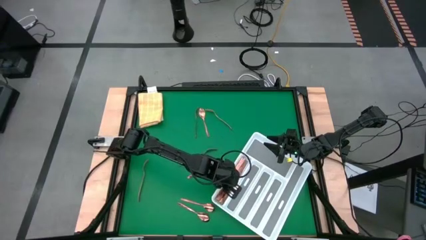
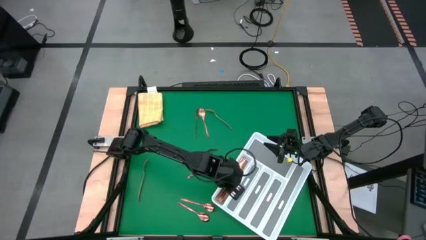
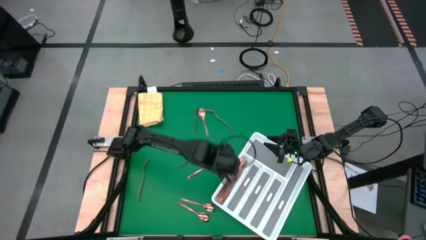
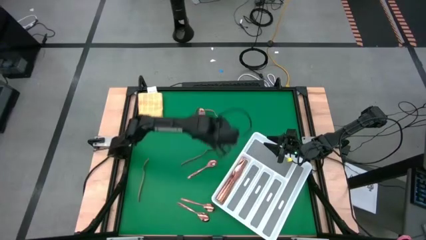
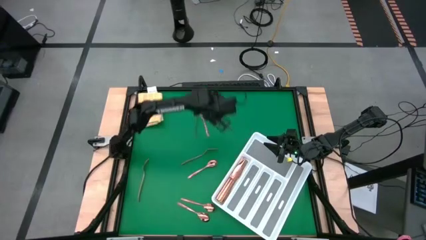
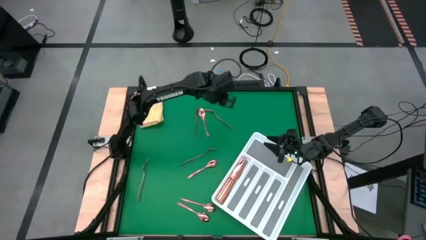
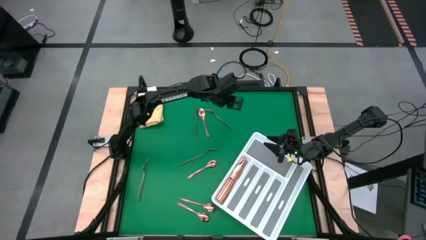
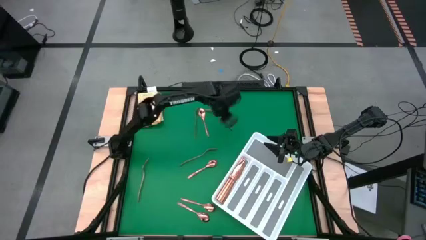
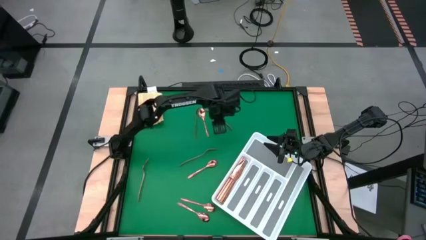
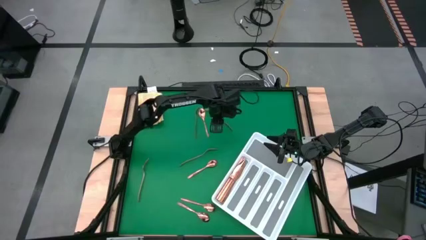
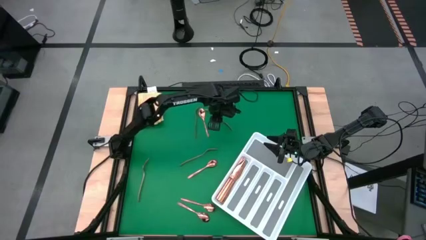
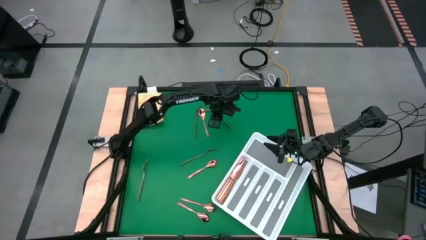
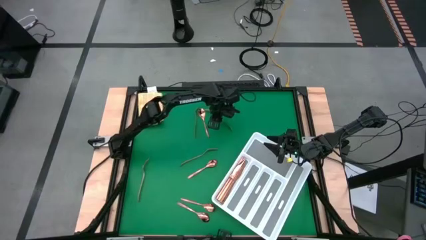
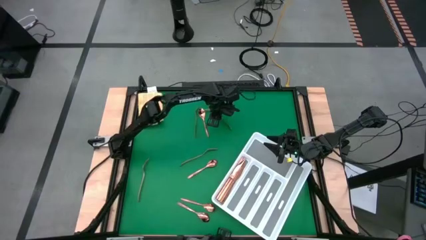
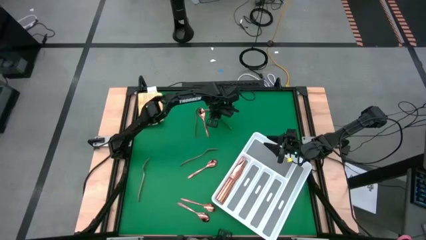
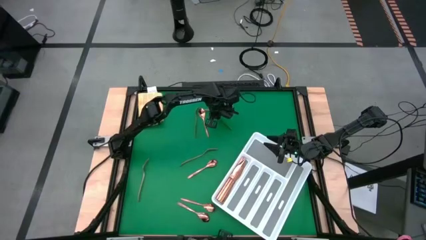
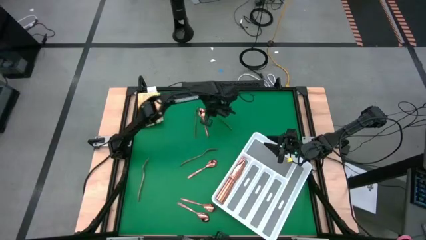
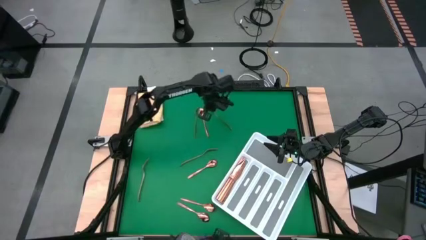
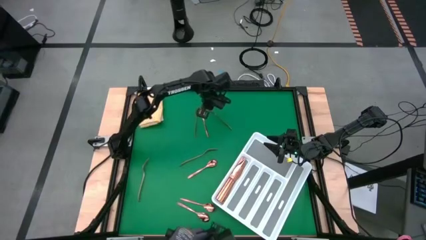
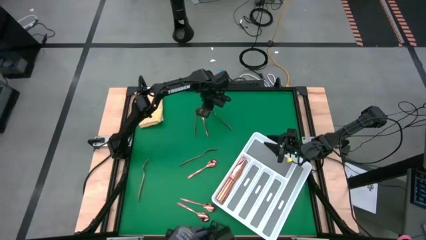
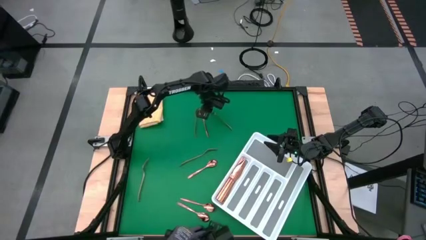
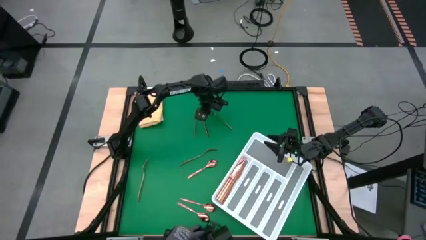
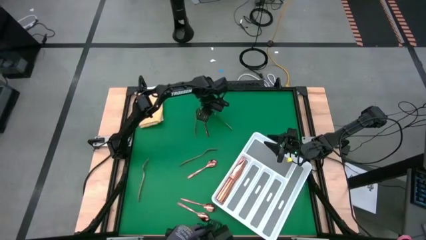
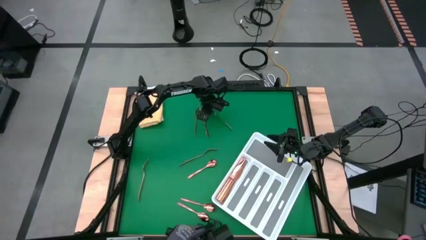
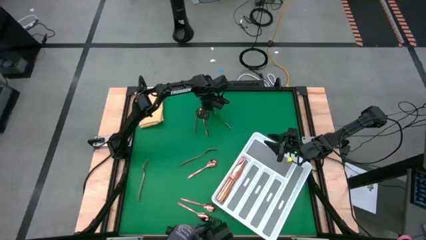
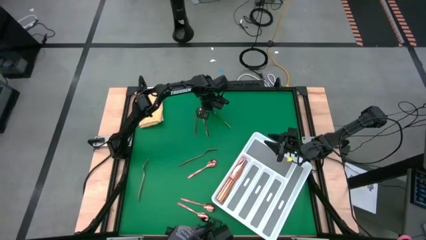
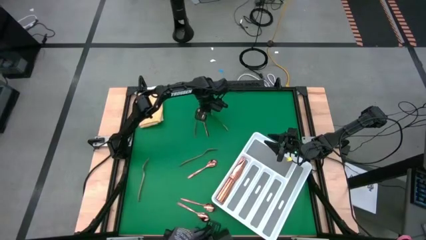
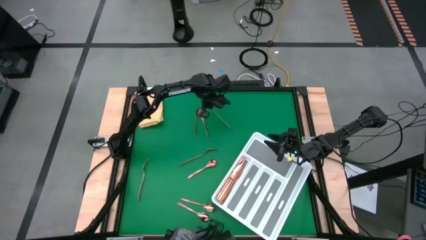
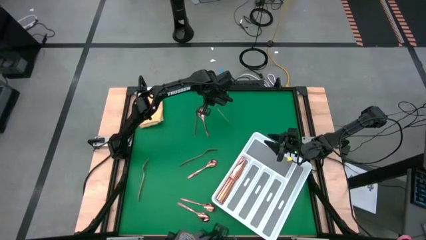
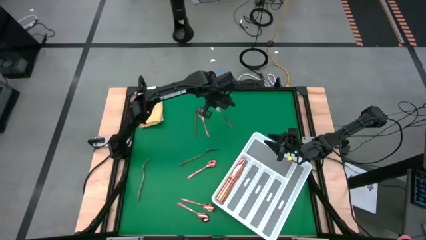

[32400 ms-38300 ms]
Task: Sort silverware
Put the gold fork into the white cutlery tray

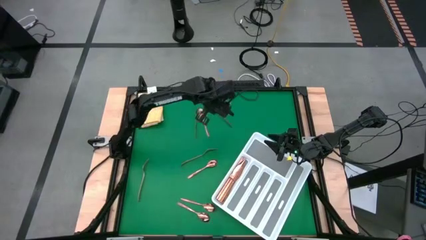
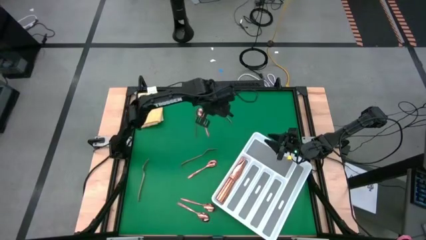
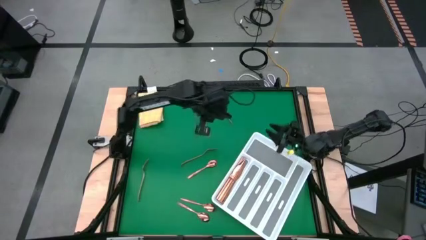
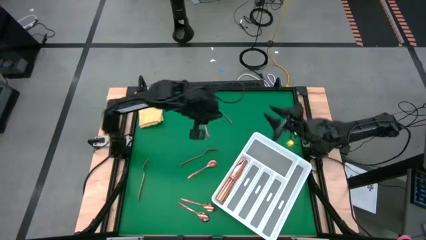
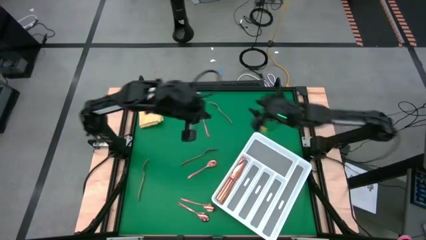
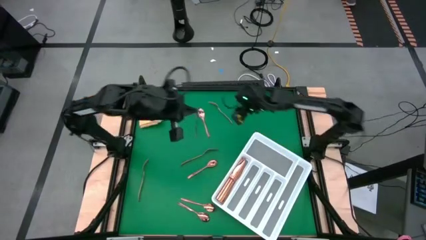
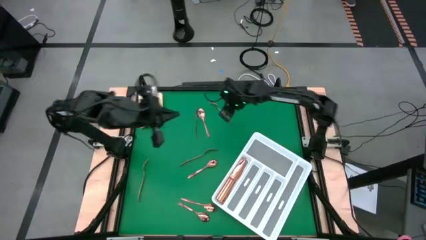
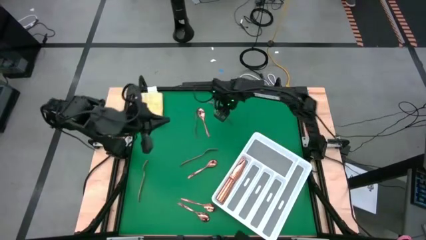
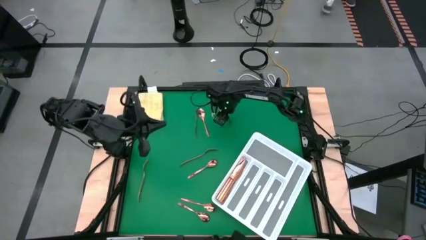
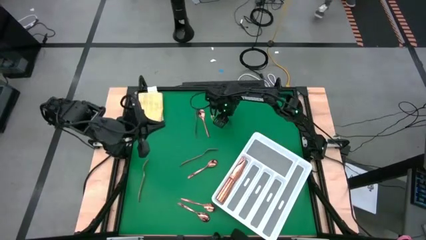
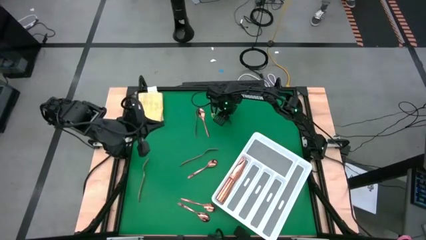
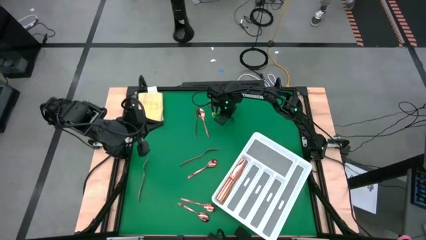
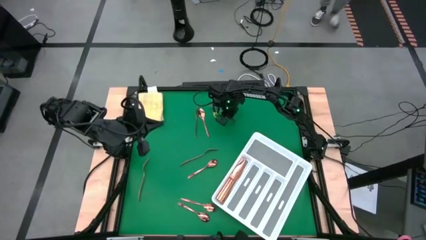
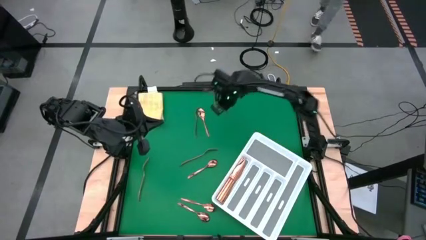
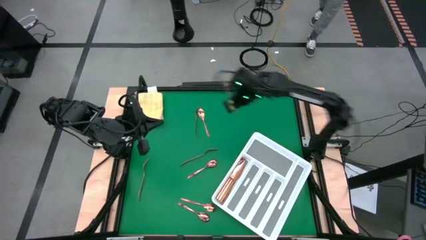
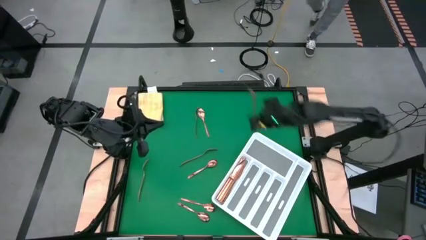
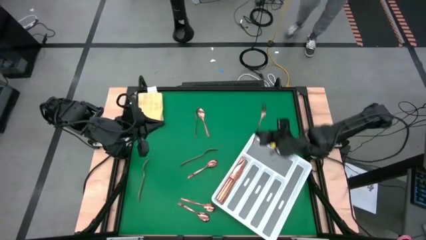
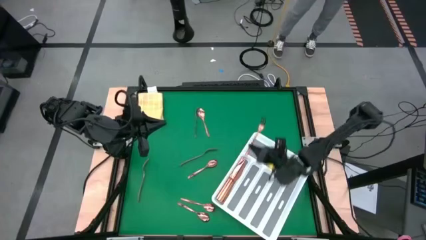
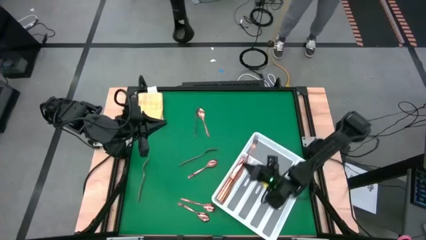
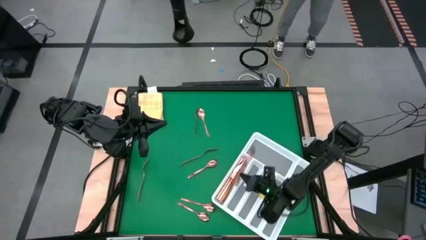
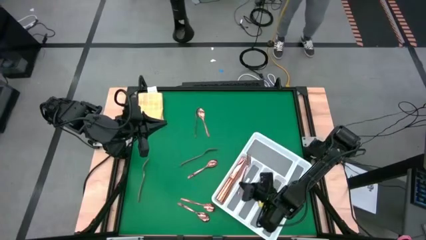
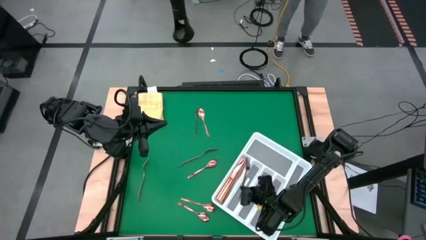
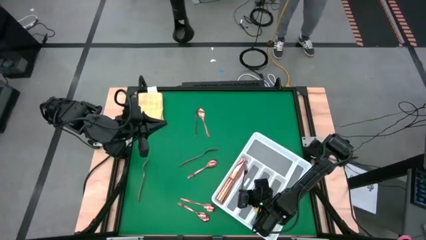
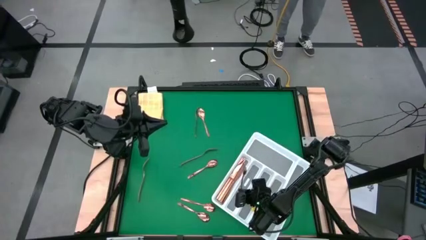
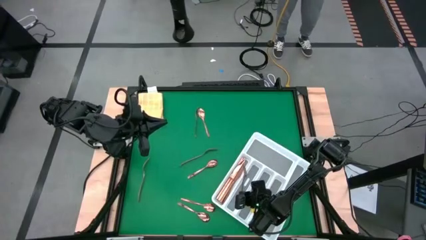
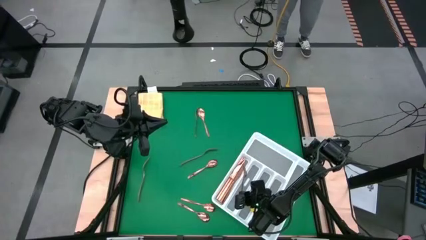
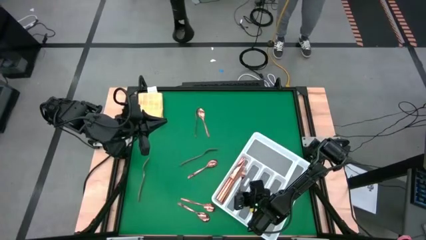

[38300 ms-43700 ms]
Put the gold fork into the white cutlery tray

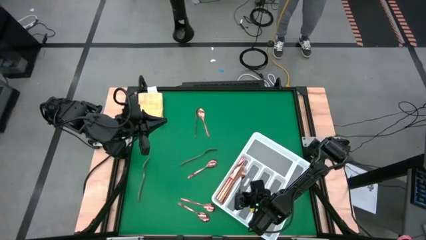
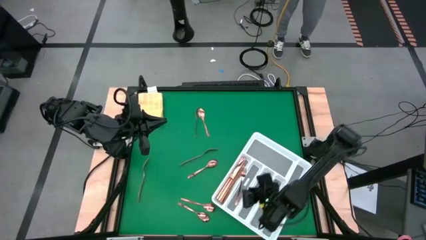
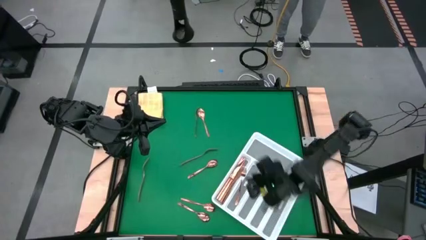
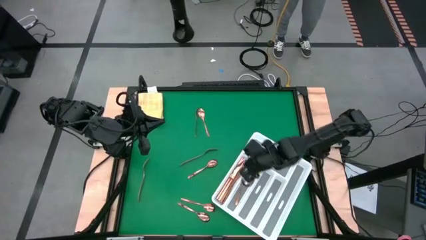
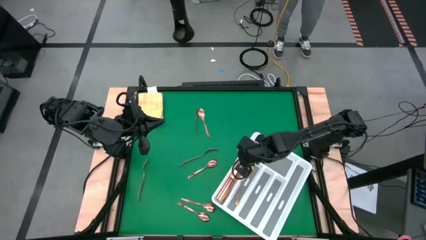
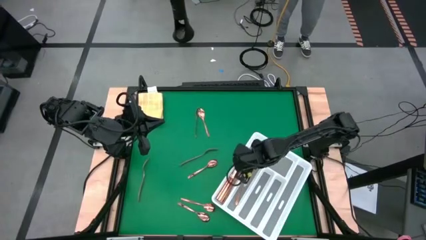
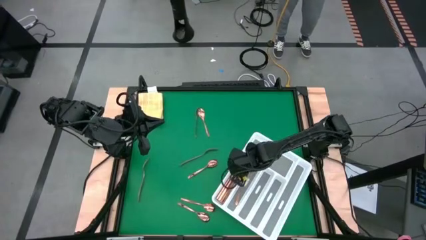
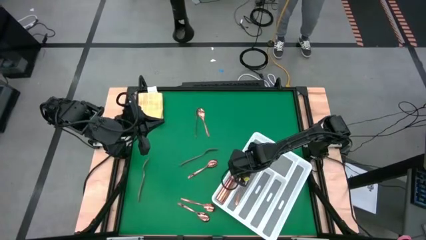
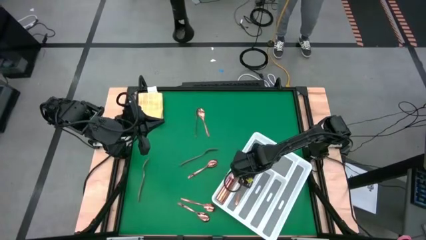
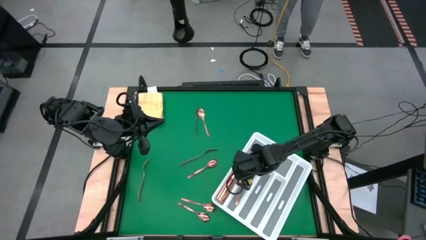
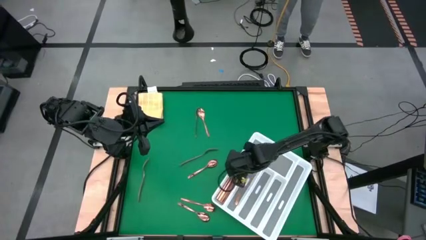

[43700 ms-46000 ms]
Put the gold fork into the white cutlery tray

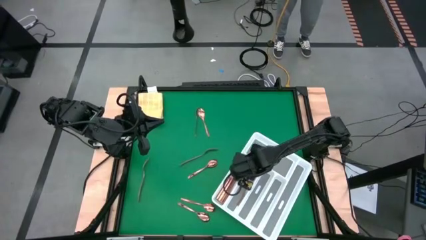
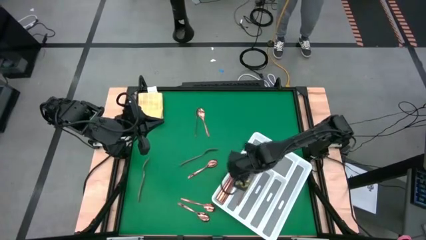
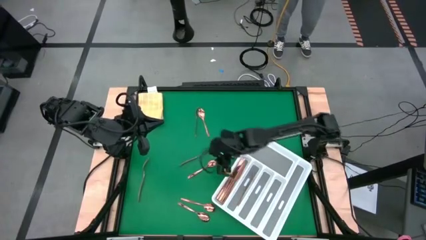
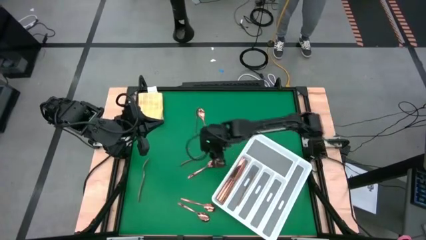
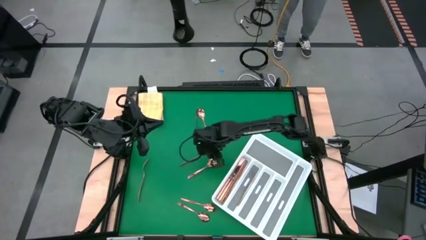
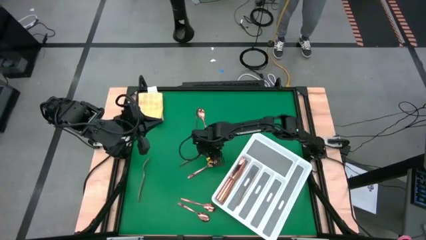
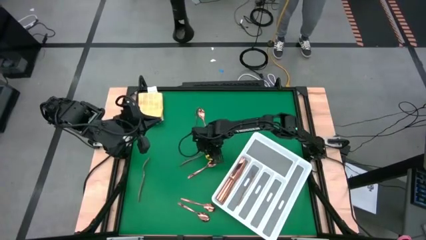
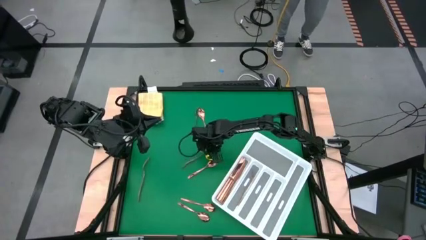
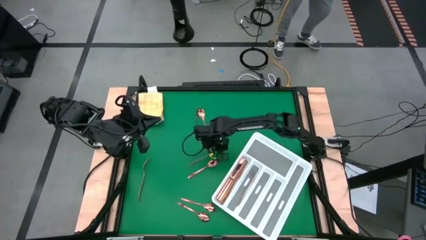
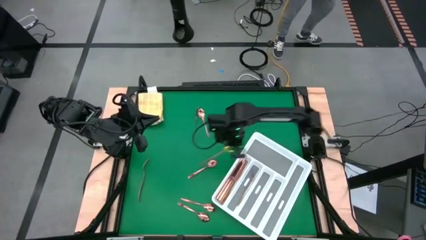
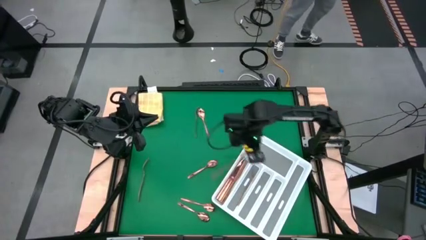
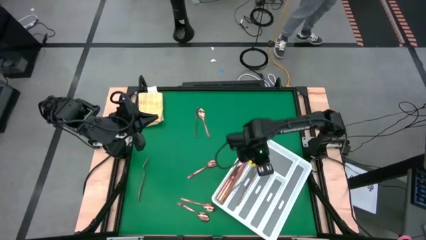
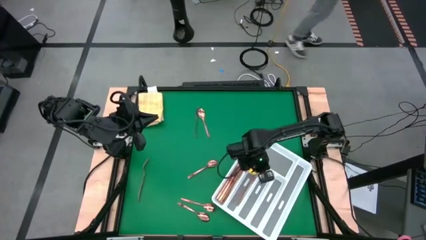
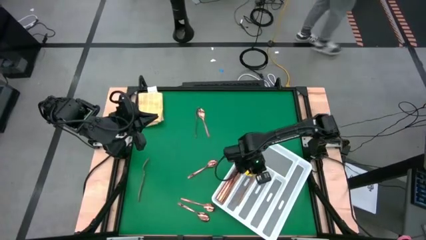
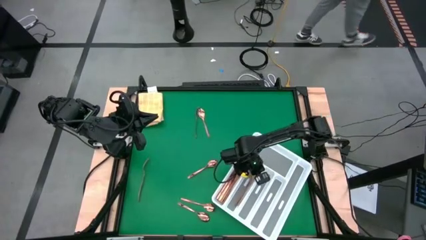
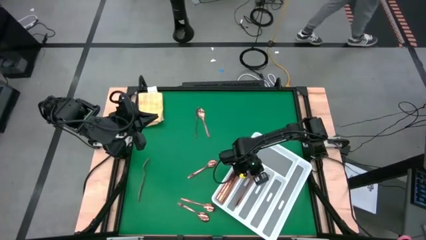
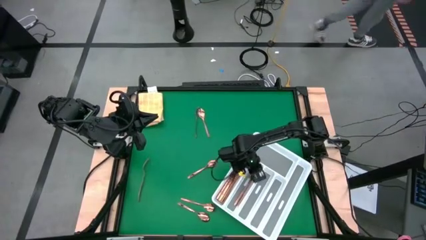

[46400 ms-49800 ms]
Put the gold fork into the white cutlery tray

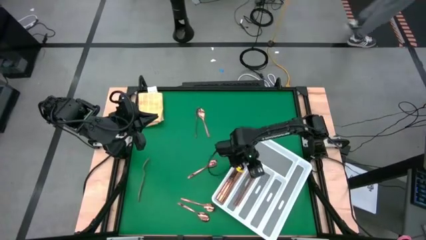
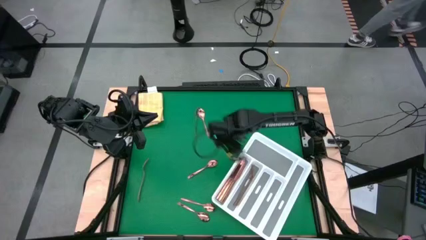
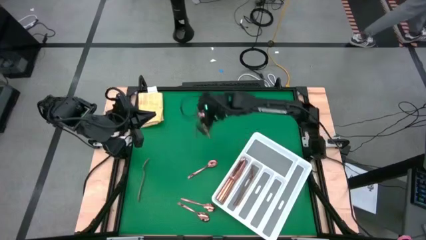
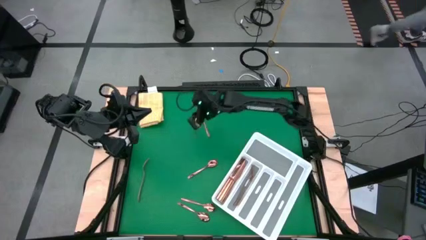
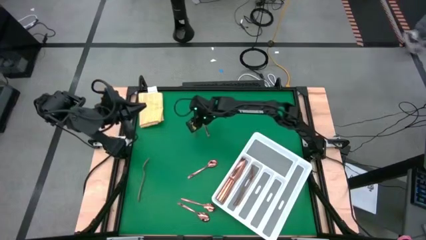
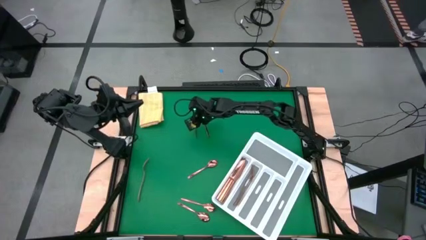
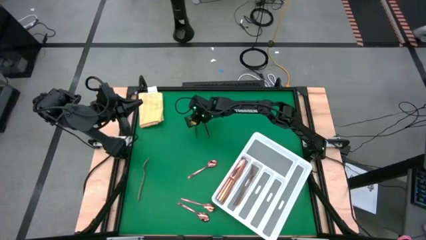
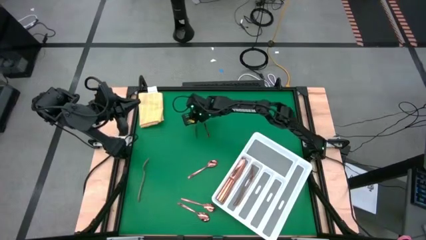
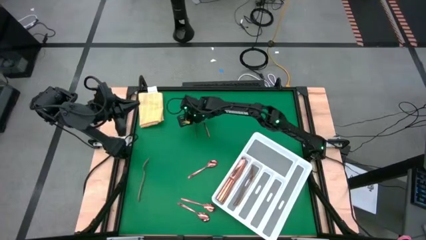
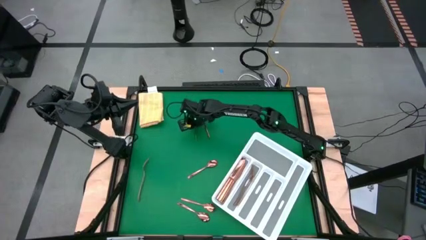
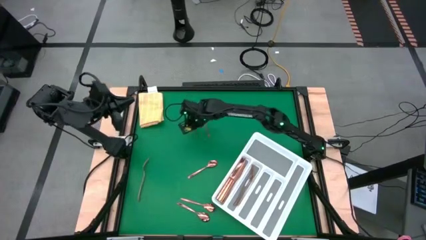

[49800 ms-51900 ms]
Put the gold fork into the white cutlery tray
